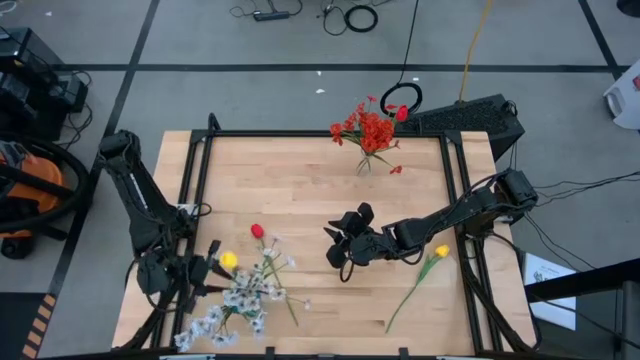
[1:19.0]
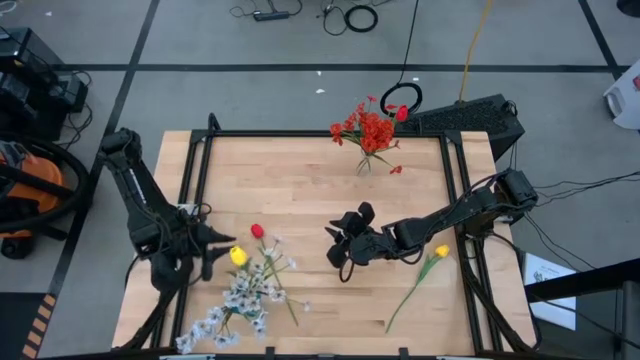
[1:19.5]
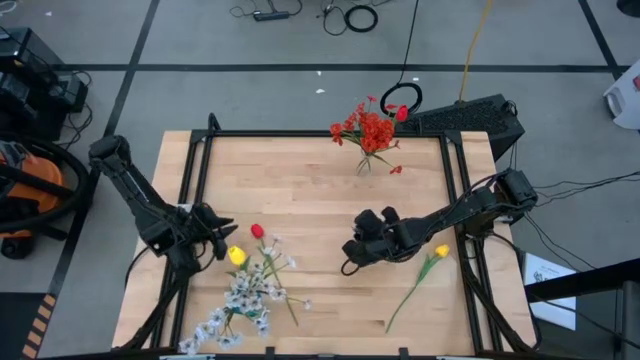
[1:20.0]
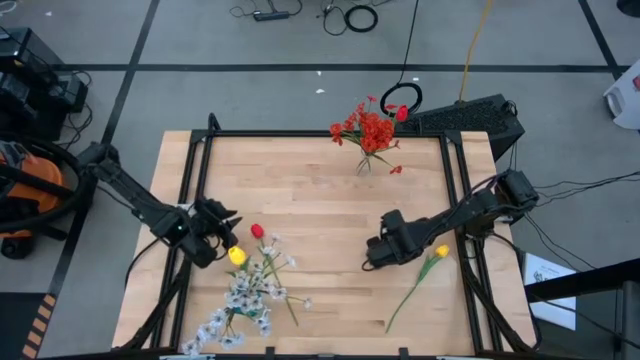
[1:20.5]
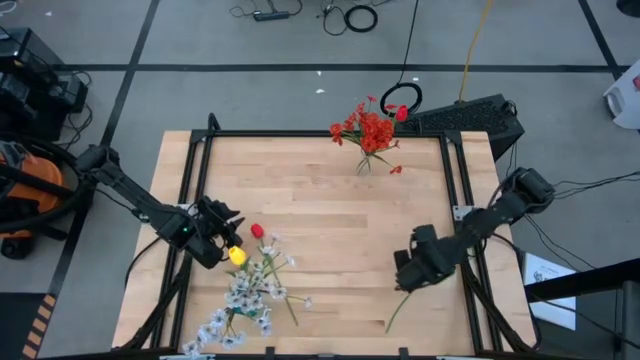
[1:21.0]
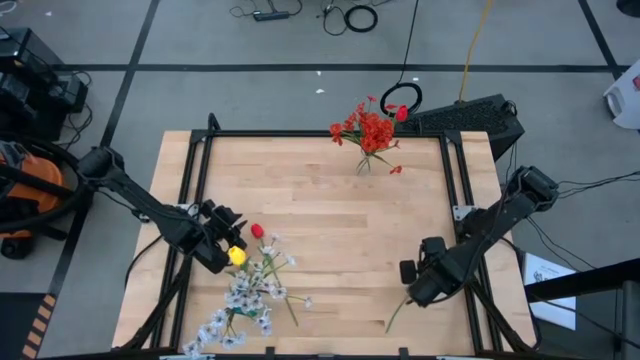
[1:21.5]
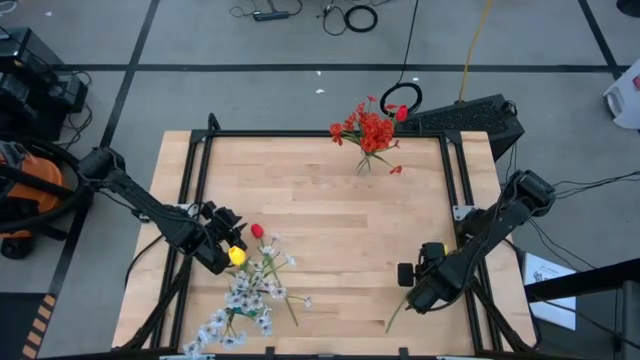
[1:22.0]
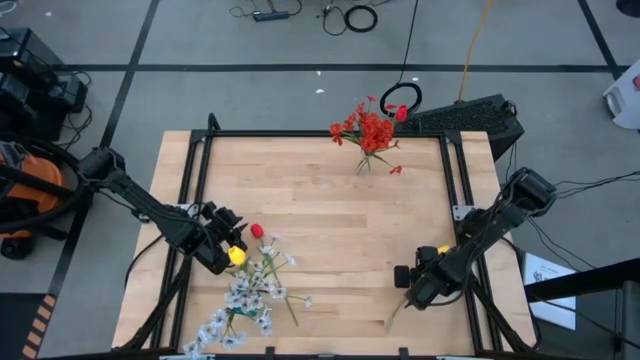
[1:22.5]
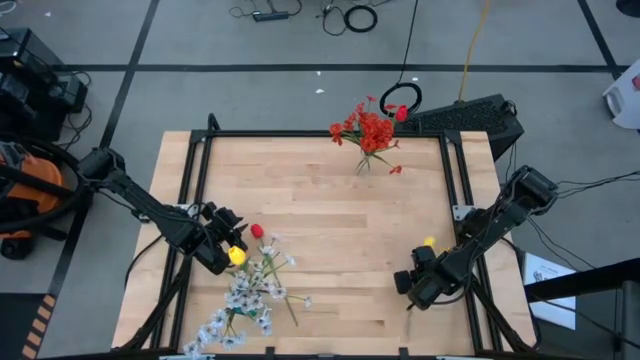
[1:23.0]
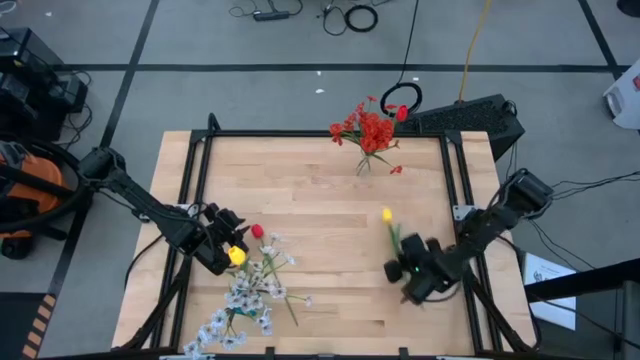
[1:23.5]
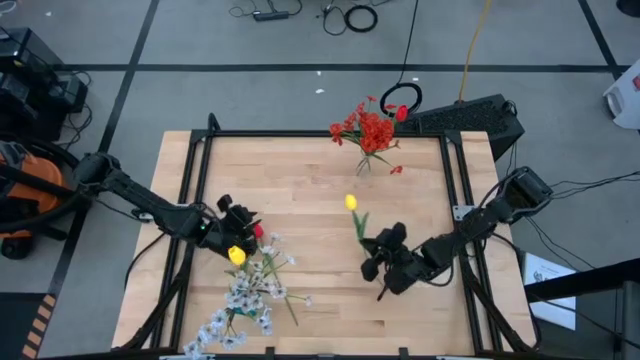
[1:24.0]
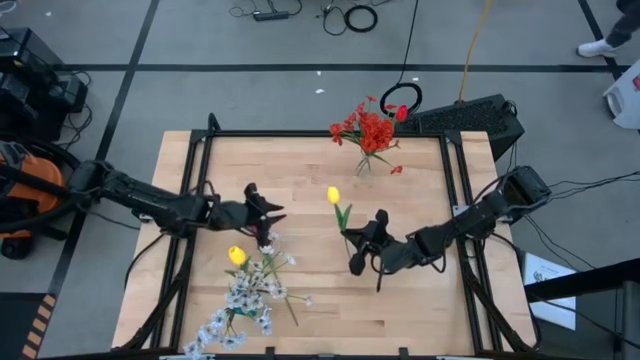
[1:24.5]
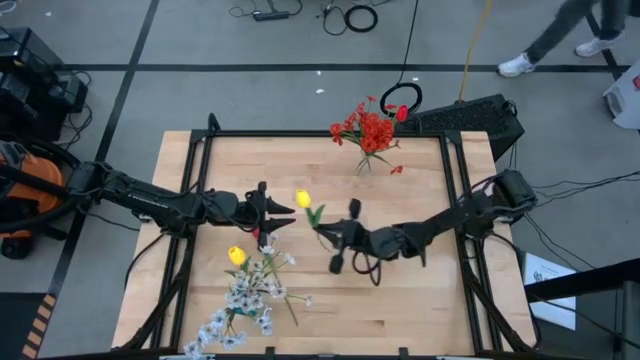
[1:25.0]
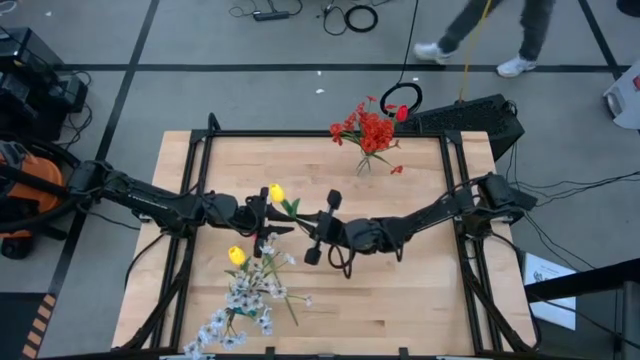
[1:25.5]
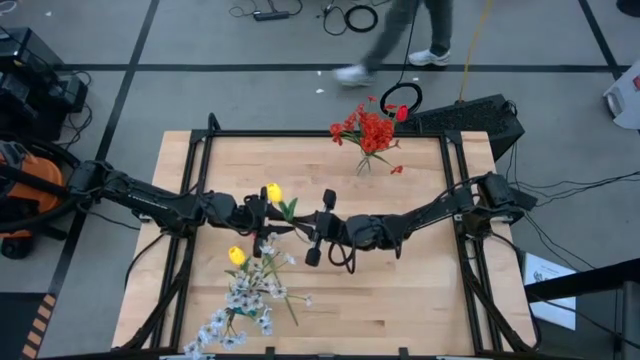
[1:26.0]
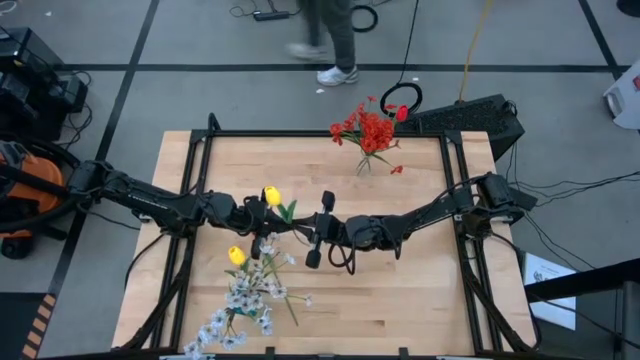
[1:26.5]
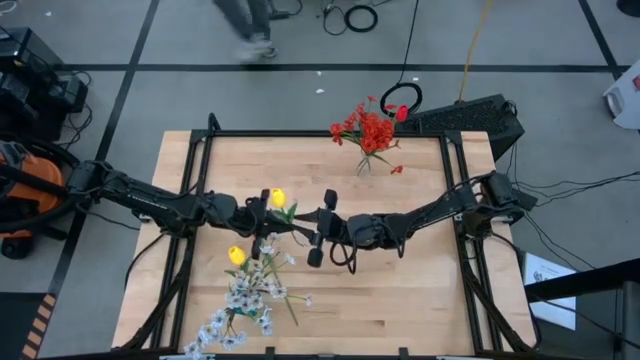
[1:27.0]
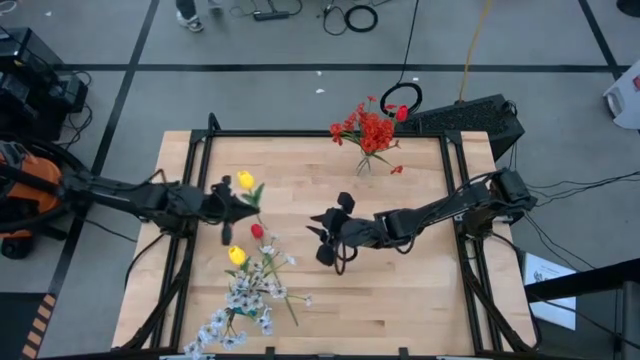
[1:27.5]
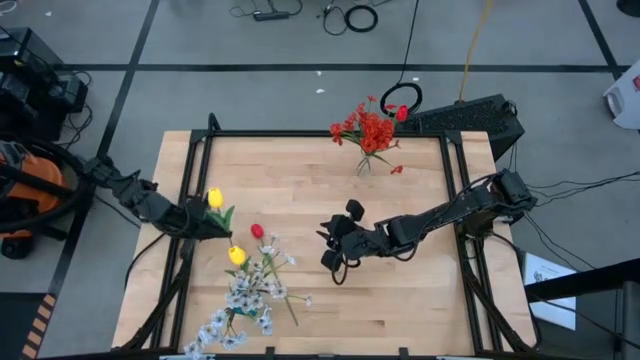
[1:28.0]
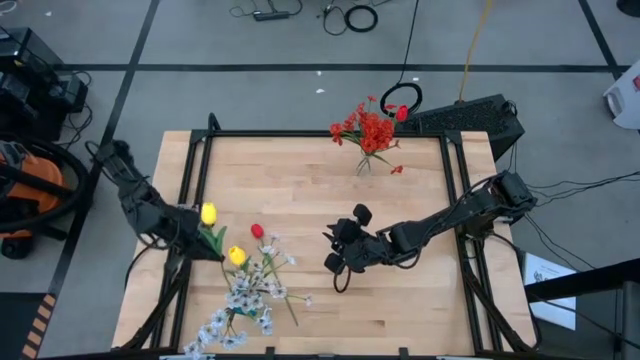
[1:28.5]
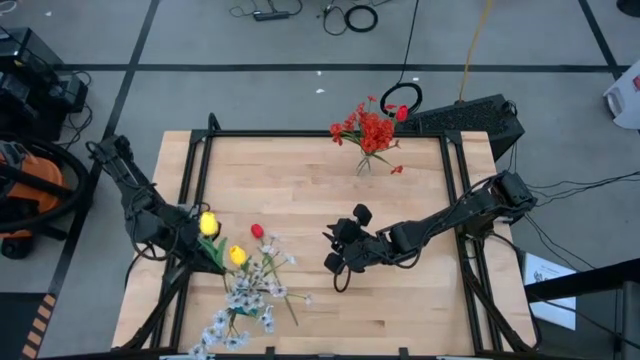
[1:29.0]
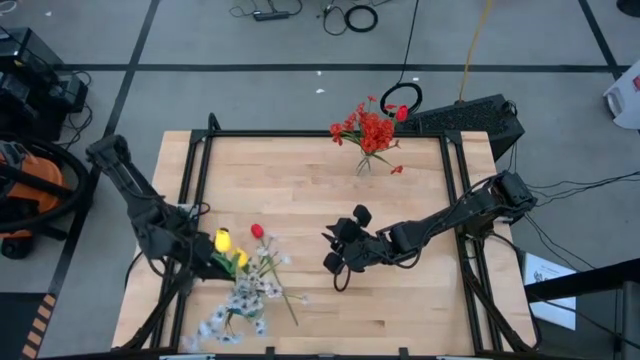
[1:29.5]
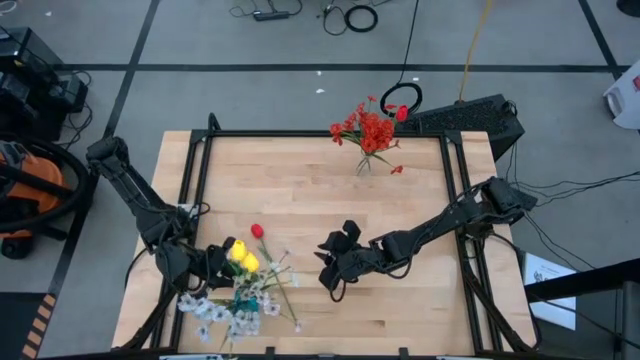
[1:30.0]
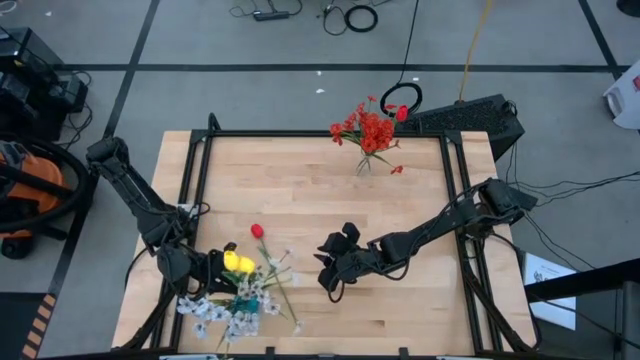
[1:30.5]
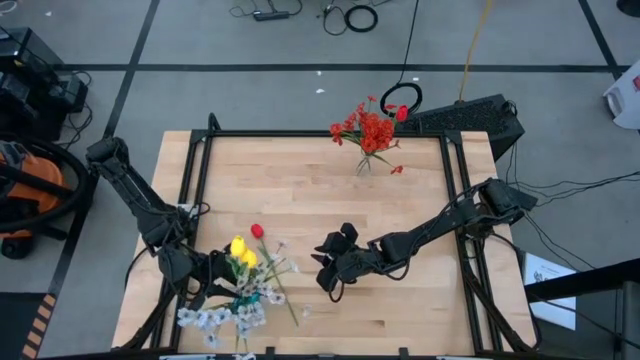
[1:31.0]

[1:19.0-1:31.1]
Task: Sort flowers into vase by color
Put the yellow flower into the blue flower vase

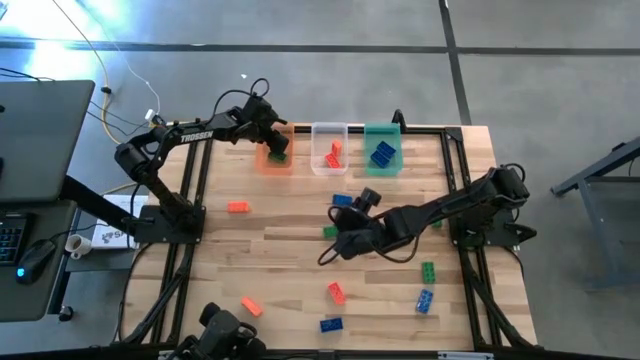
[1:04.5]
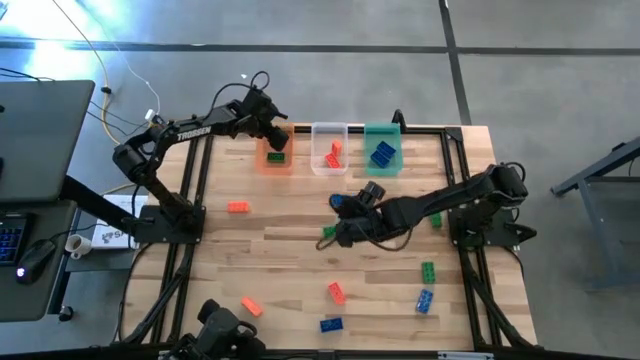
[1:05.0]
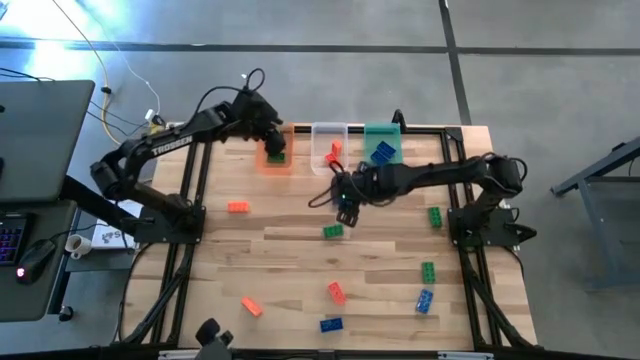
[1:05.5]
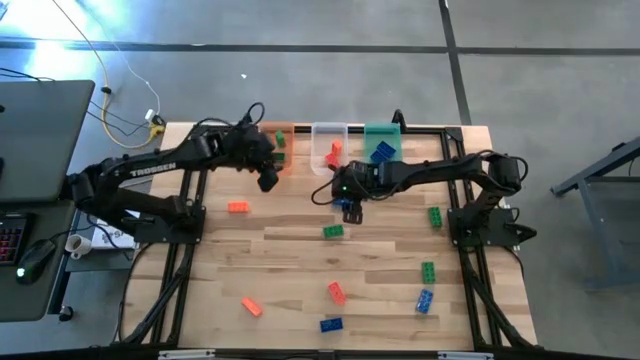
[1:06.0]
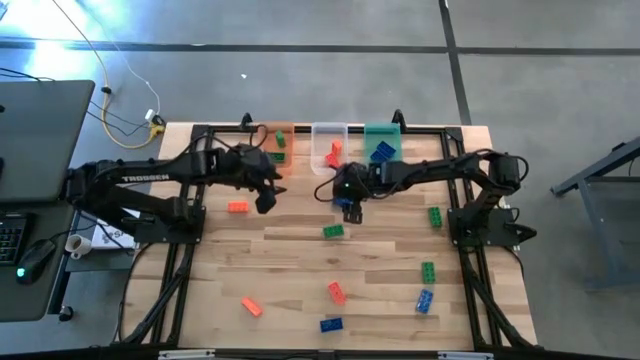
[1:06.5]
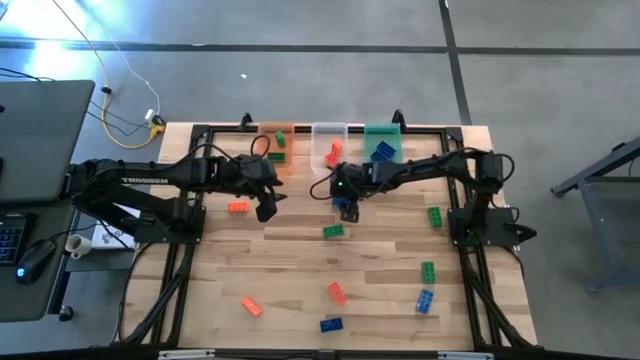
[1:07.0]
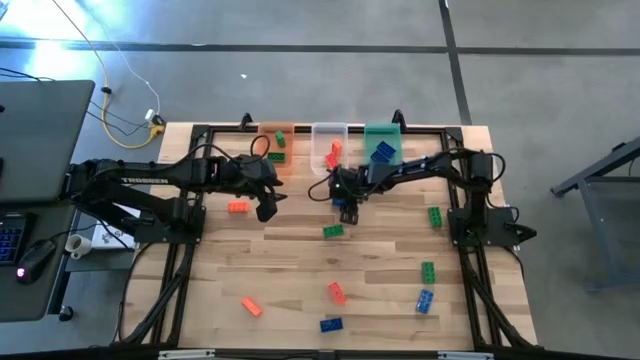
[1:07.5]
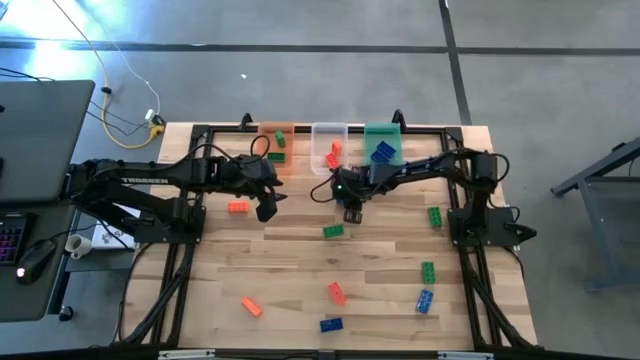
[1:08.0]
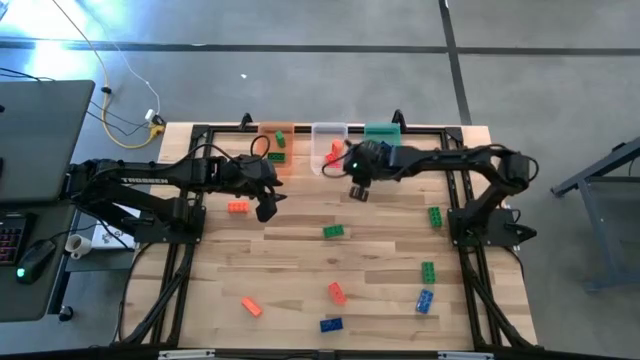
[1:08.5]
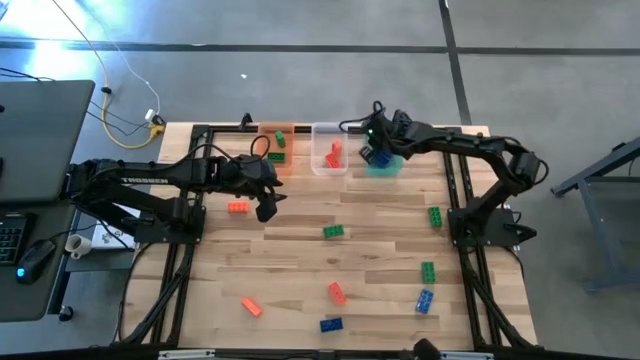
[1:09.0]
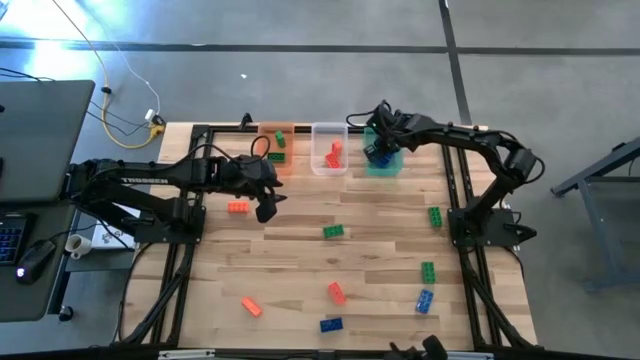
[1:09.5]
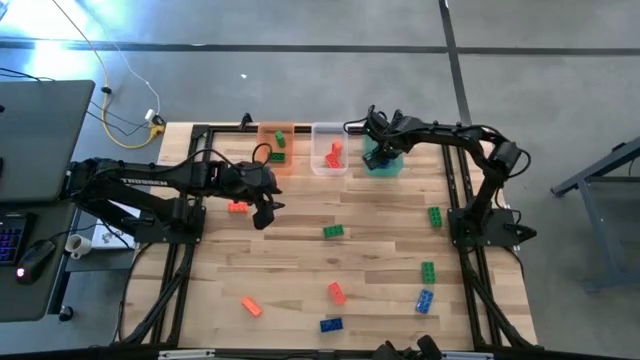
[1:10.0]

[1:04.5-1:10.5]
Task: Sort & place blocks by color
Put the blue game piece into the green bin
